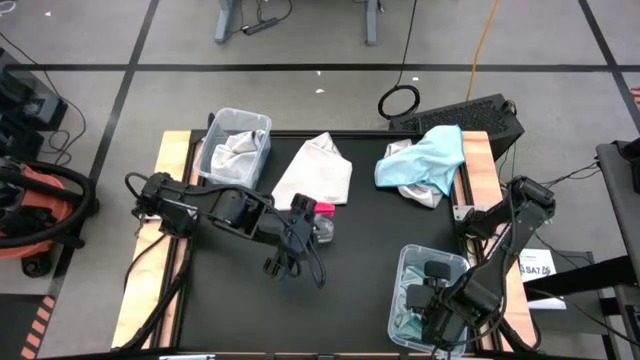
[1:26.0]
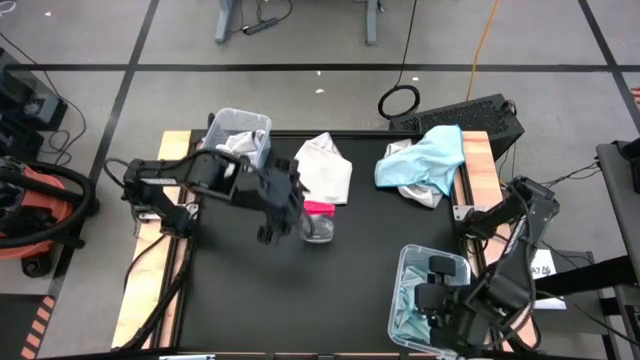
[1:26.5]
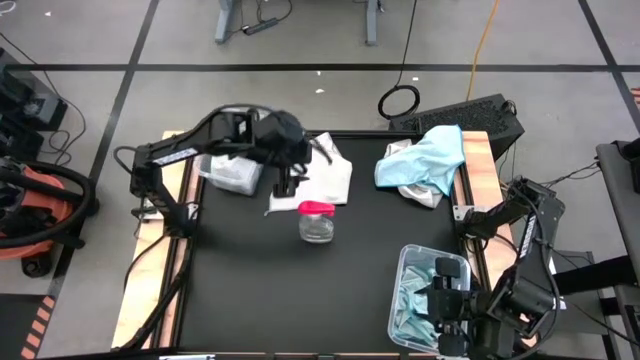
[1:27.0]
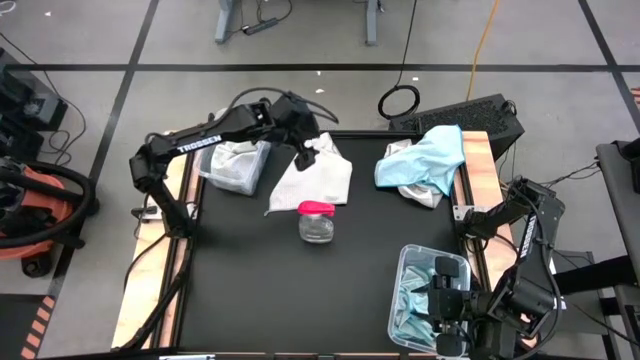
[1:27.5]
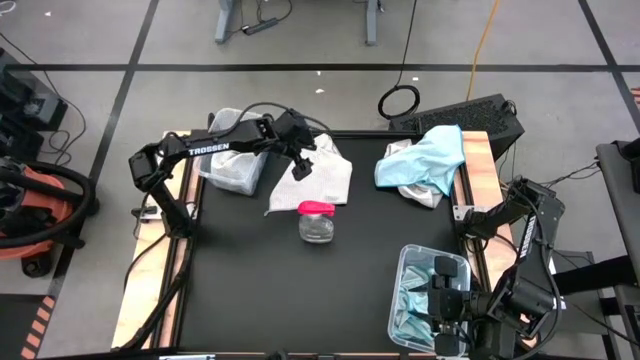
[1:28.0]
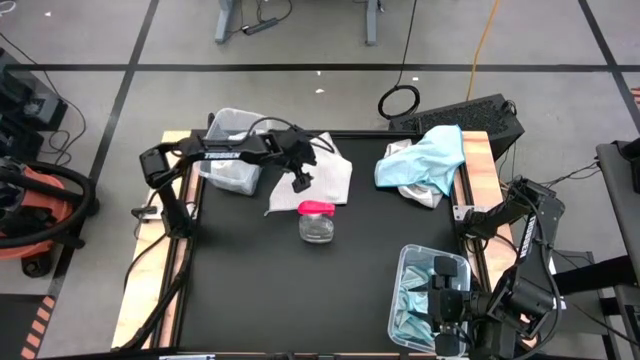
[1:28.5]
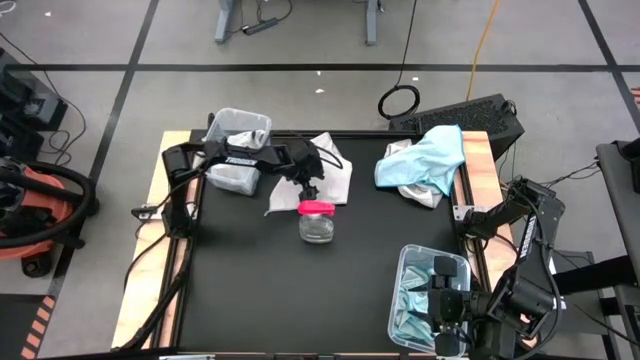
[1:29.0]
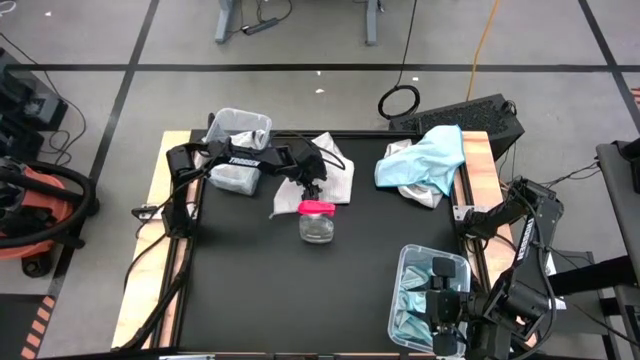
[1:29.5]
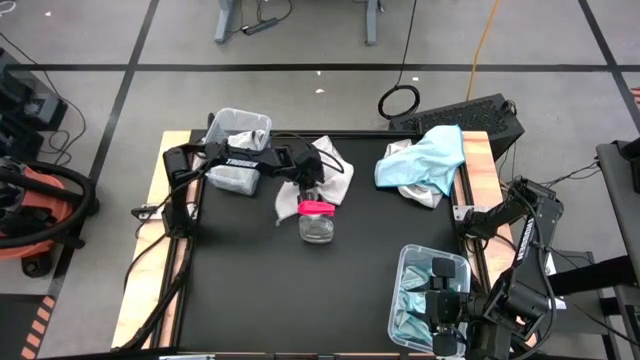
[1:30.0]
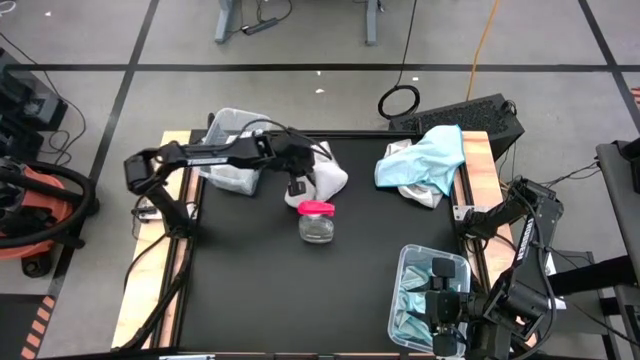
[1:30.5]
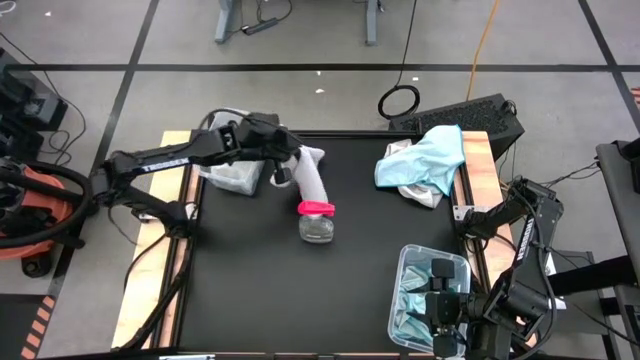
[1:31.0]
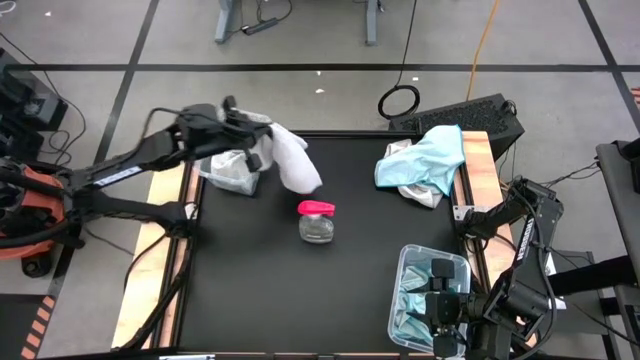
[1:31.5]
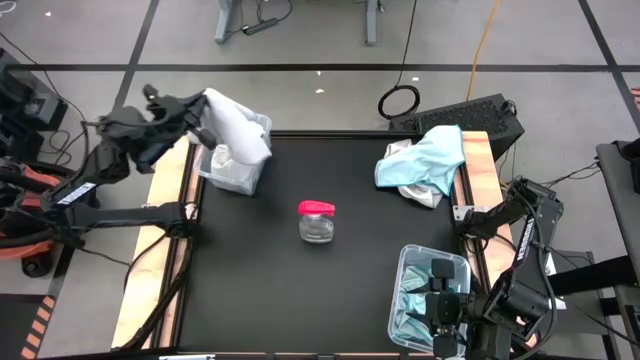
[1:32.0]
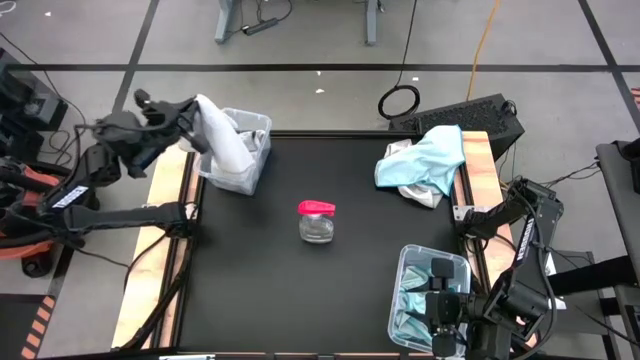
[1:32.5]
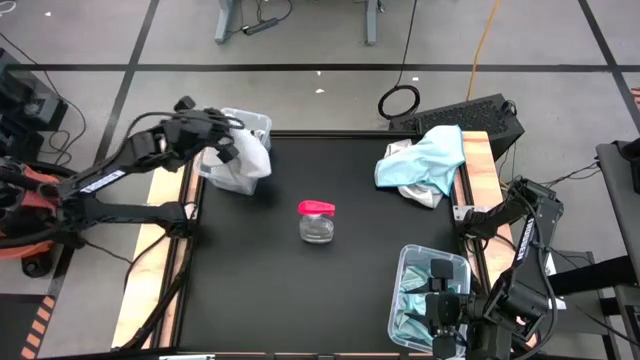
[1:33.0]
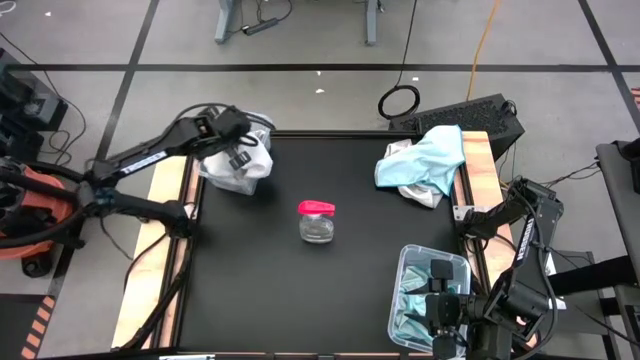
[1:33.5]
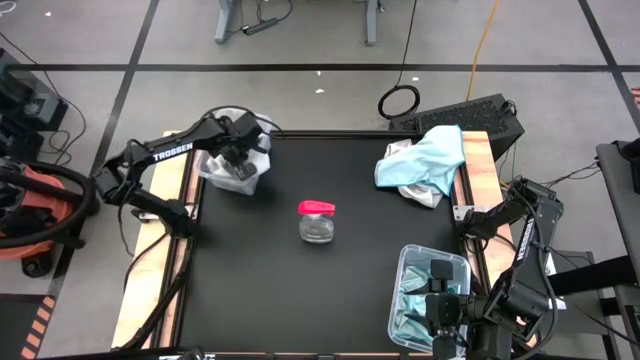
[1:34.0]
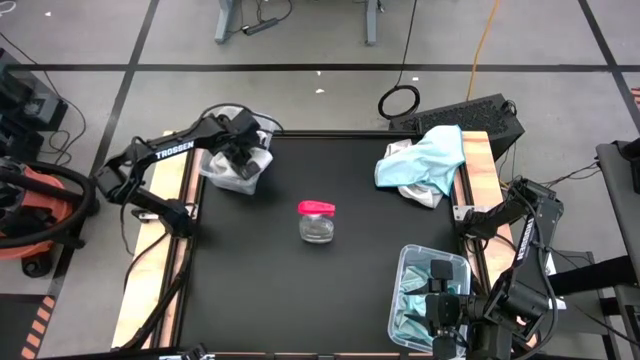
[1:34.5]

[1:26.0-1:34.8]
Task: Sort microfiber towel by color & place in baskets
Put the left gray towel into the left transparent bin

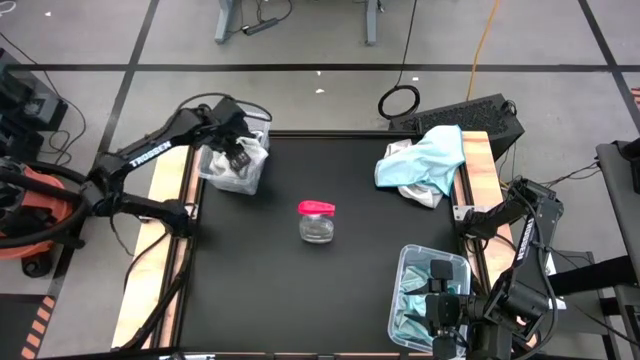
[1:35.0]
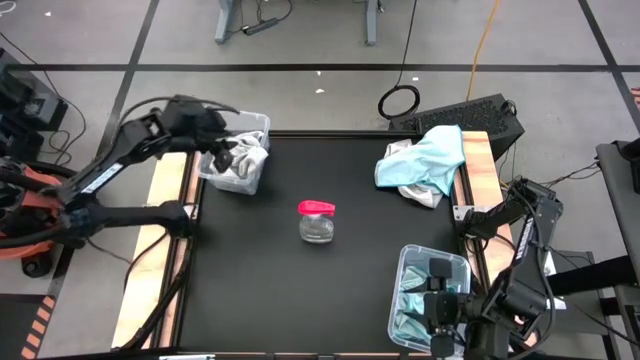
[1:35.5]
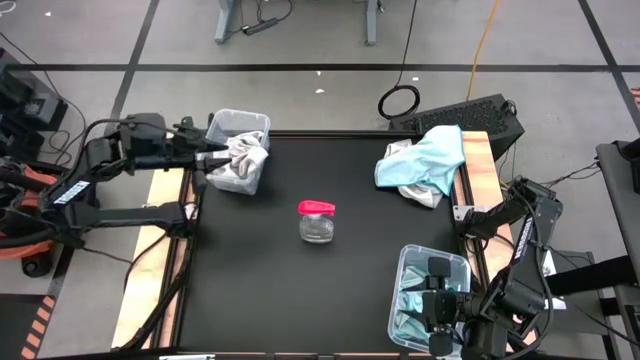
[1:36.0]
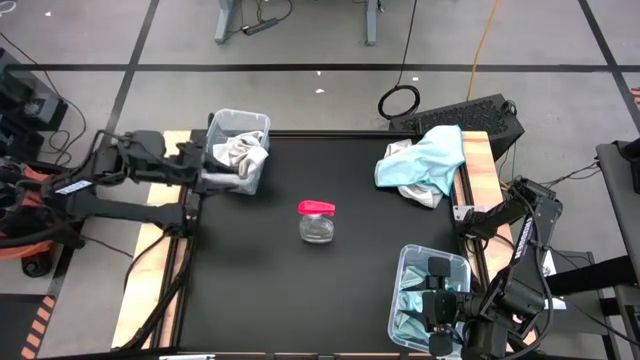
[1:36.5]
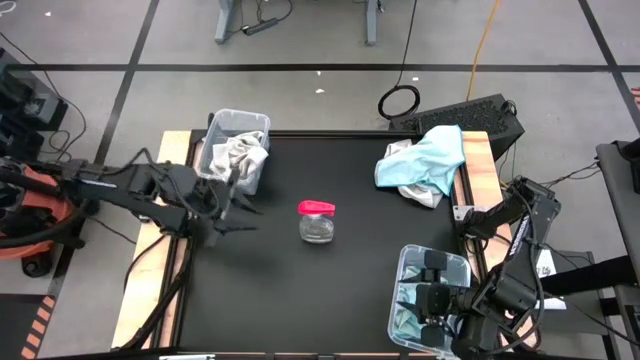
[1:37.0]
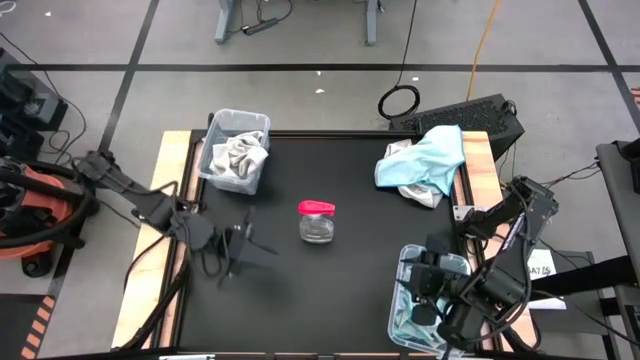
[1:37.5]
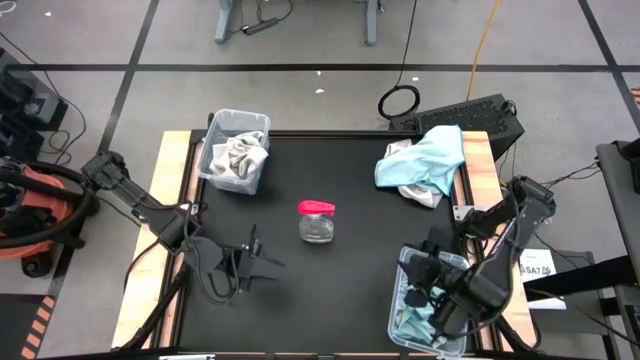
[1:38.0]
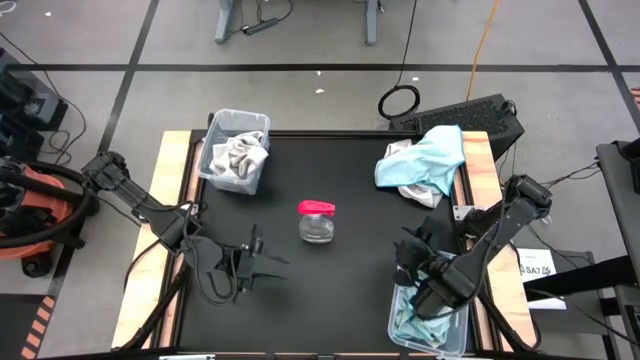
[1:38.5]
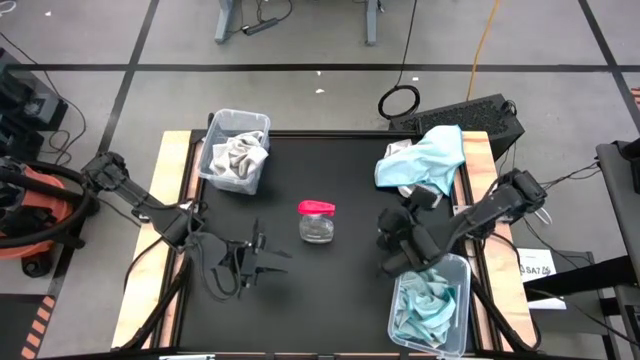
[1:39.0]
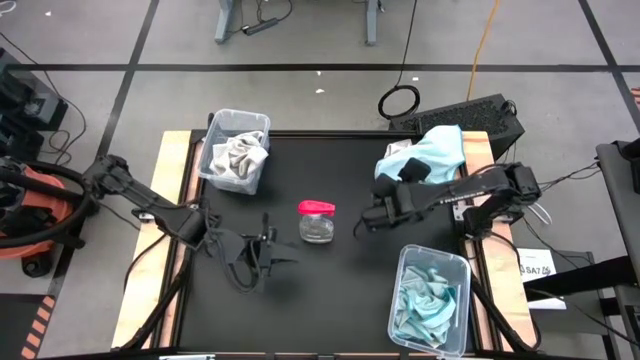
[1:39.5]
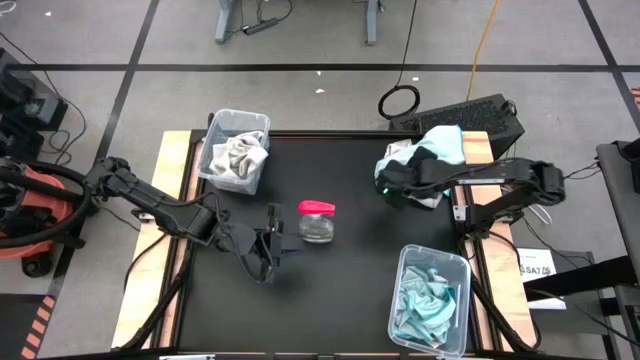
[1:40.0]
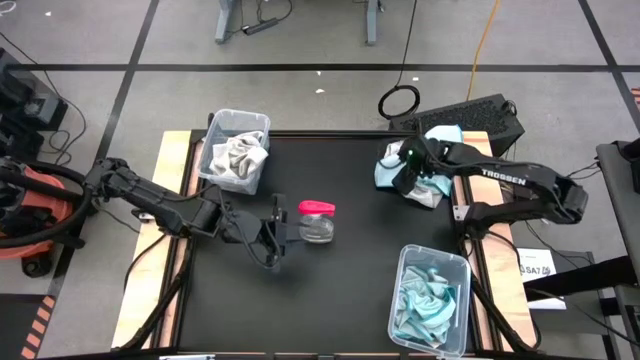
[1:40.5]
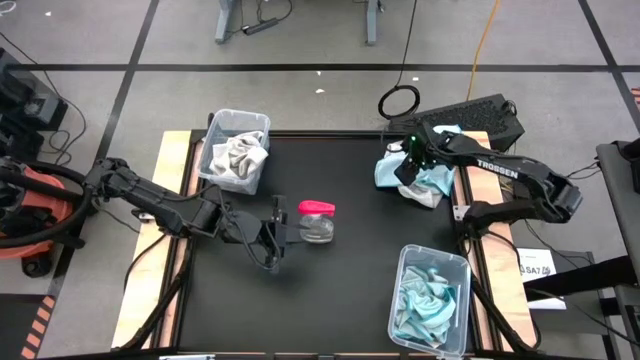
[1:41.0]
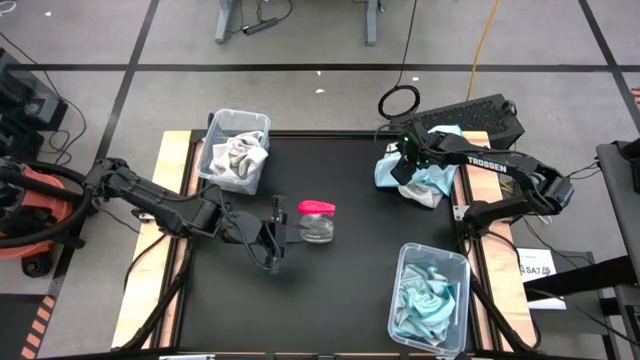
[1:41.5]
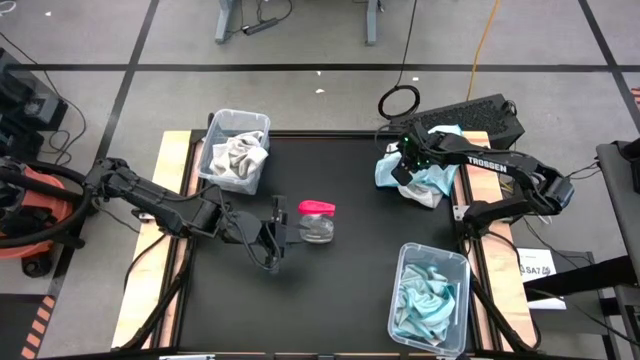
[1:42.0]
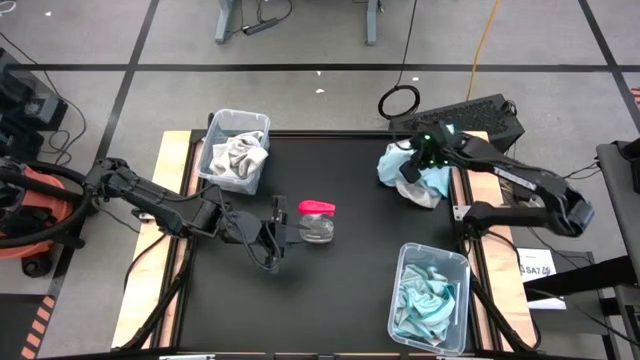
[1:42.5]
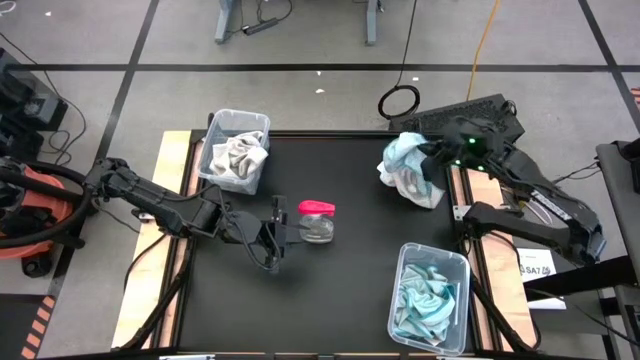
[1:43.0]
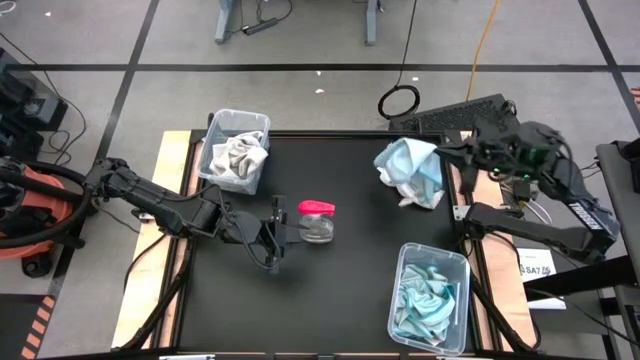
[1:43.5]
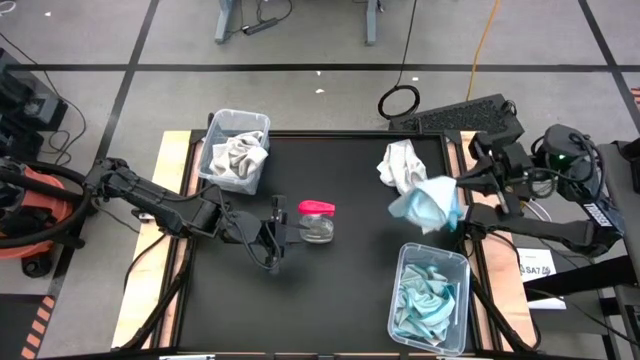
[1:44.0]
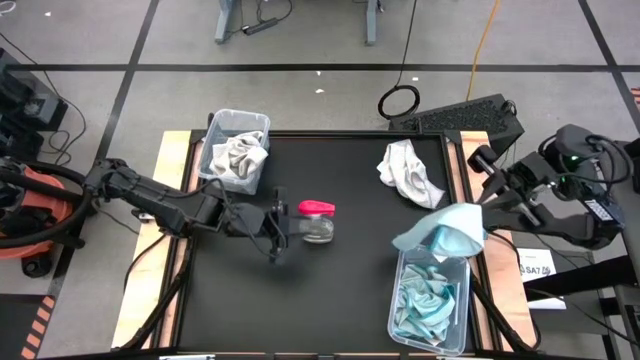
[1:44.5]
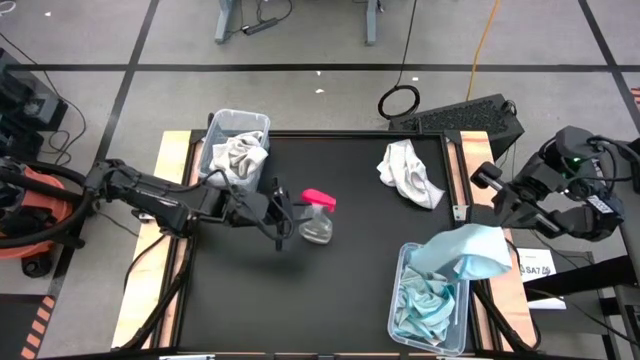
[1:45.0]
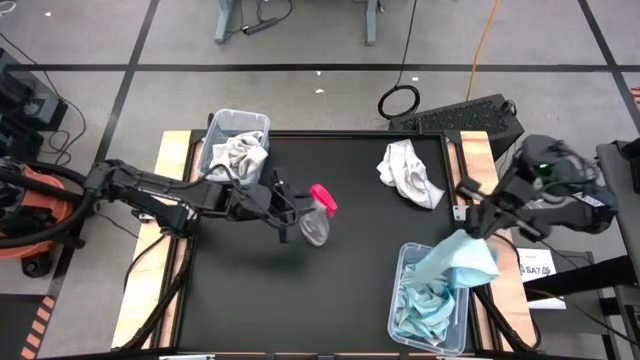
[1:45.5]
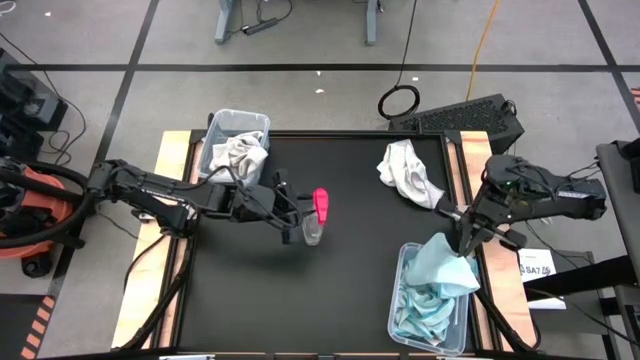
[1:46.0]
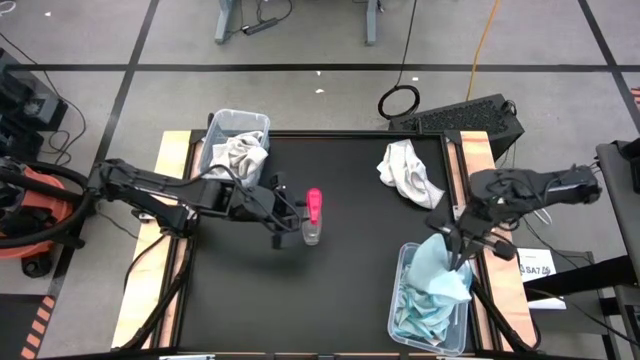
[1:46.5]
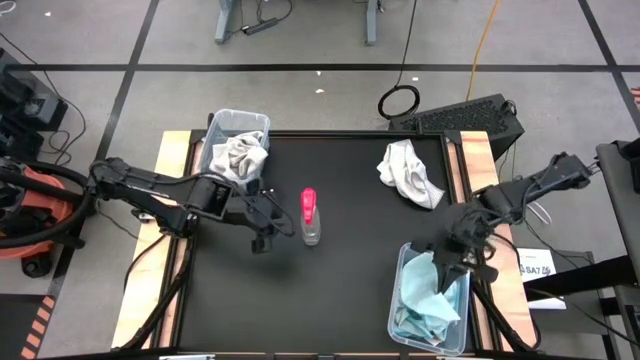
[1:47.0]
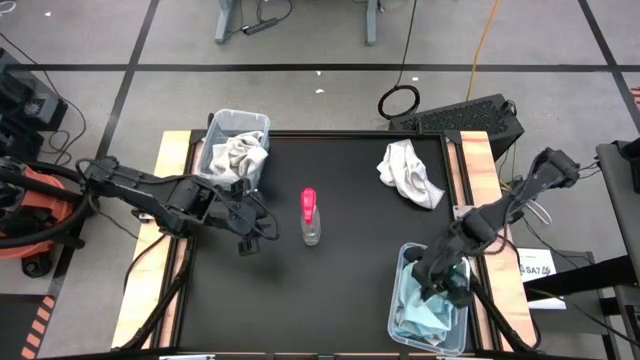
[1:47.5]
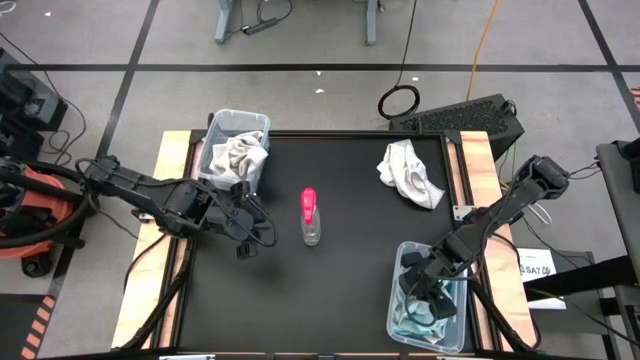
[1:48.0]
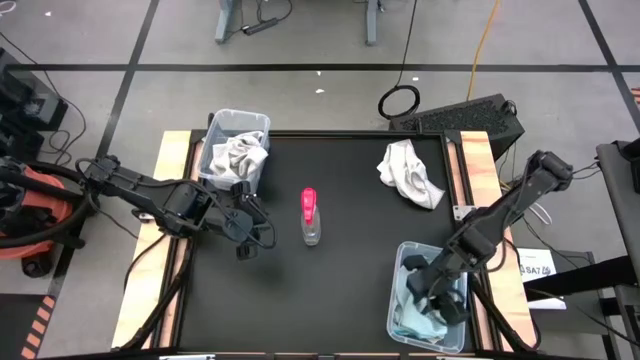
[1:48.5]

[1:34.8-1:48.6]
Put the light blue towel into the right transparent bin
